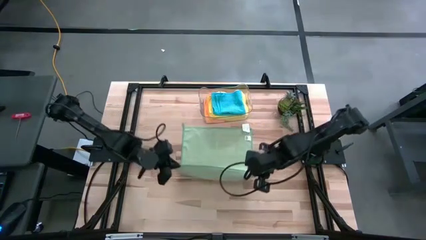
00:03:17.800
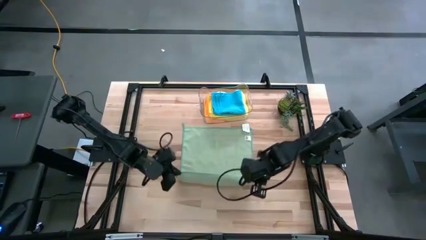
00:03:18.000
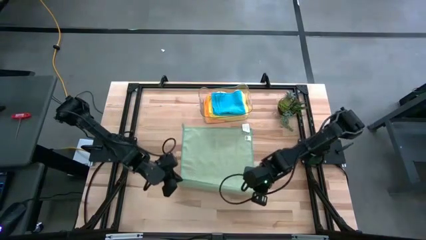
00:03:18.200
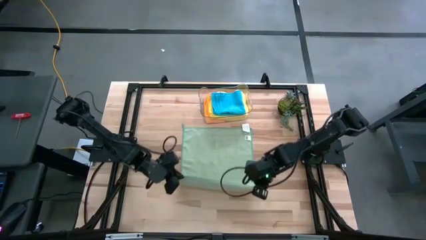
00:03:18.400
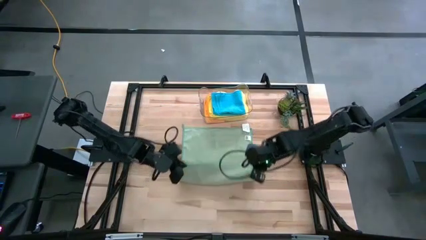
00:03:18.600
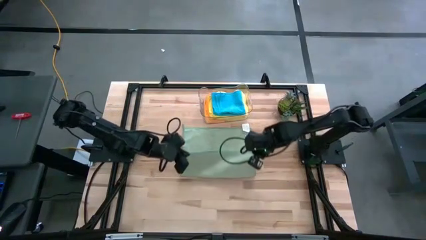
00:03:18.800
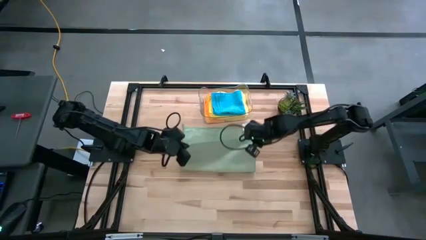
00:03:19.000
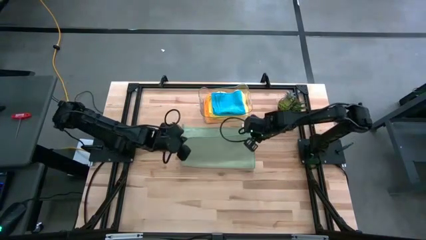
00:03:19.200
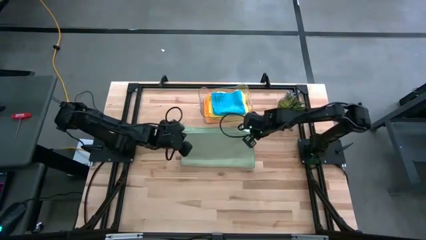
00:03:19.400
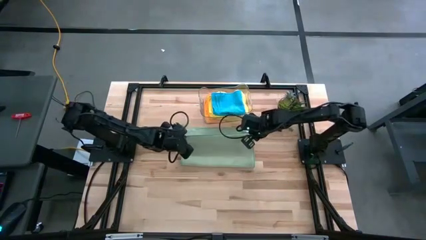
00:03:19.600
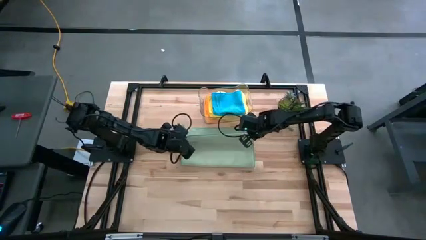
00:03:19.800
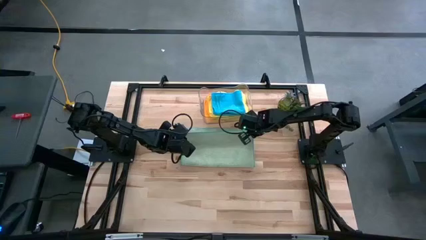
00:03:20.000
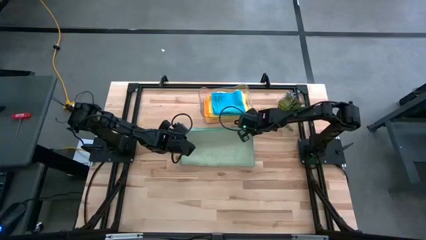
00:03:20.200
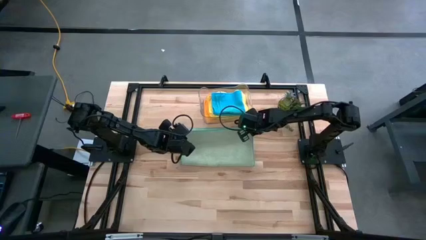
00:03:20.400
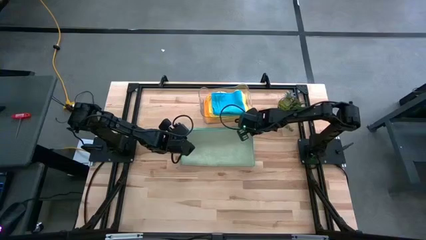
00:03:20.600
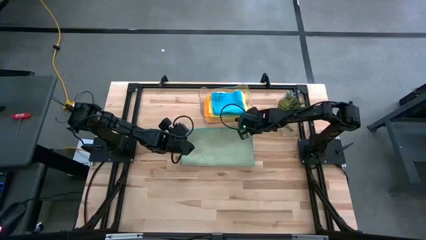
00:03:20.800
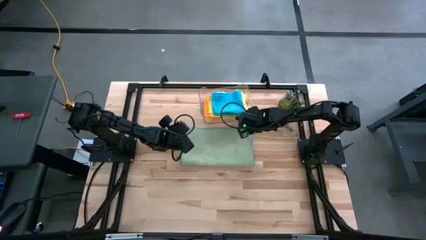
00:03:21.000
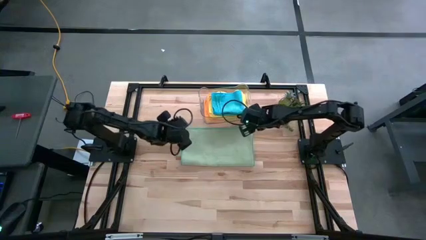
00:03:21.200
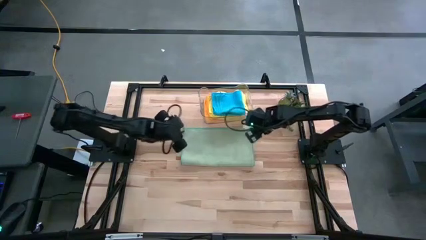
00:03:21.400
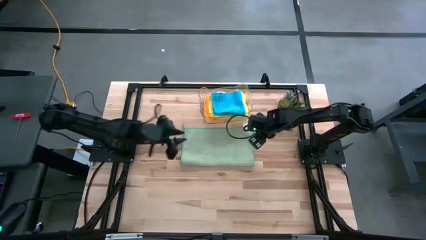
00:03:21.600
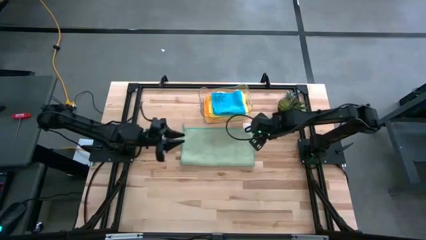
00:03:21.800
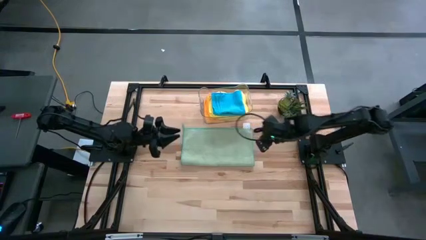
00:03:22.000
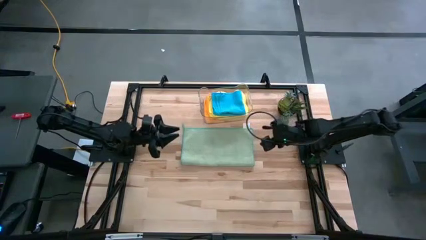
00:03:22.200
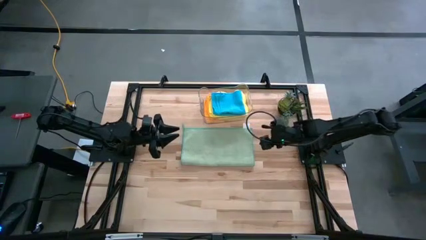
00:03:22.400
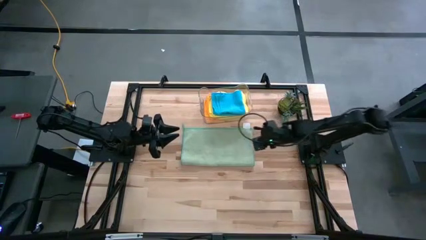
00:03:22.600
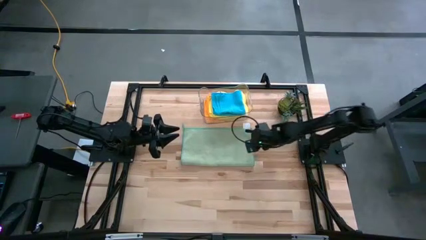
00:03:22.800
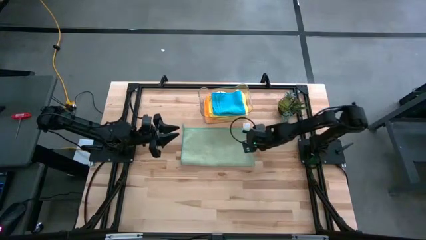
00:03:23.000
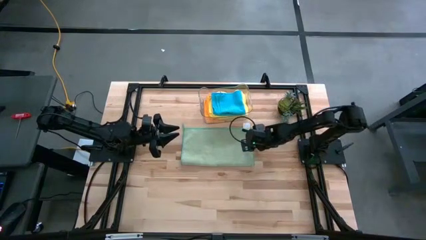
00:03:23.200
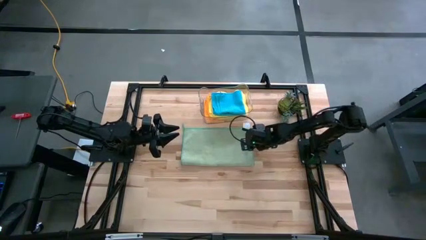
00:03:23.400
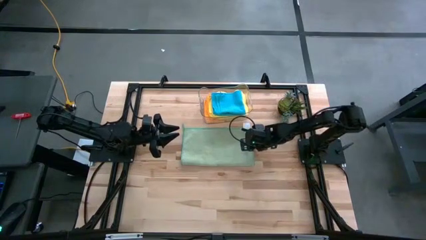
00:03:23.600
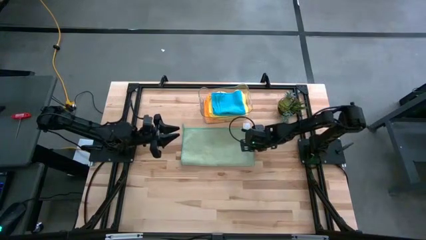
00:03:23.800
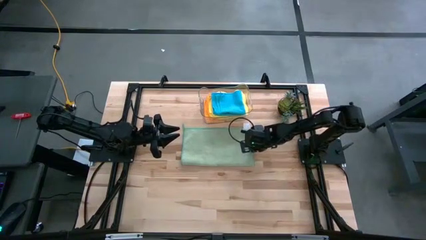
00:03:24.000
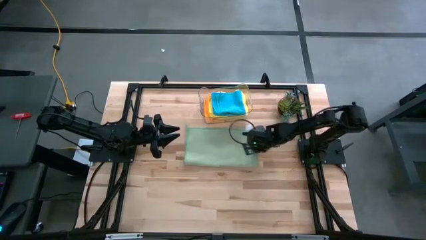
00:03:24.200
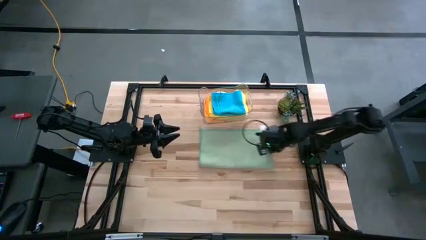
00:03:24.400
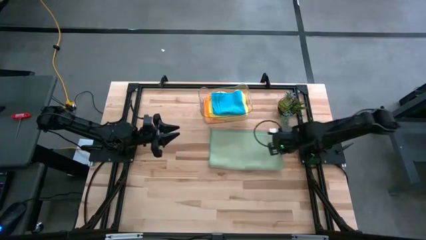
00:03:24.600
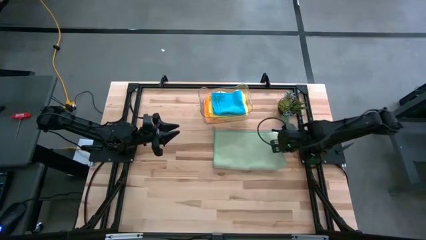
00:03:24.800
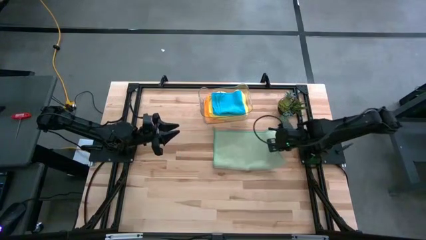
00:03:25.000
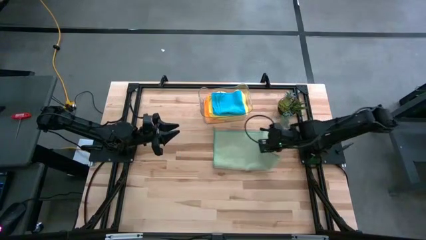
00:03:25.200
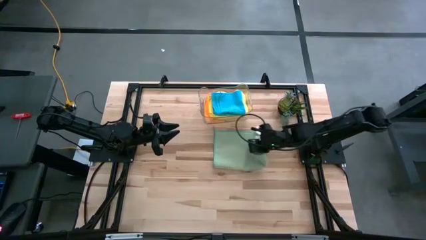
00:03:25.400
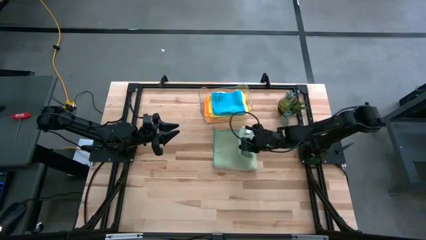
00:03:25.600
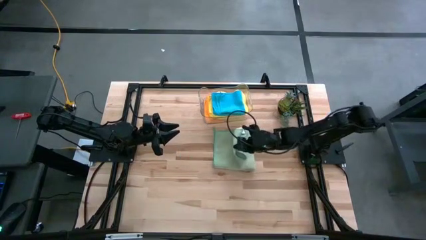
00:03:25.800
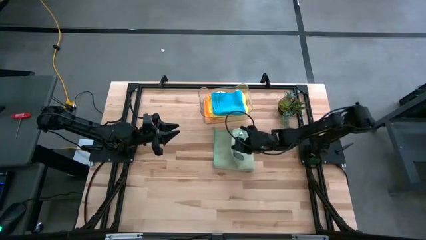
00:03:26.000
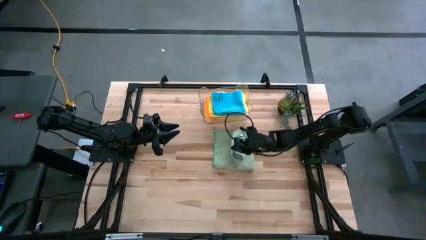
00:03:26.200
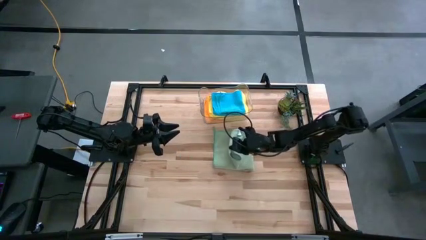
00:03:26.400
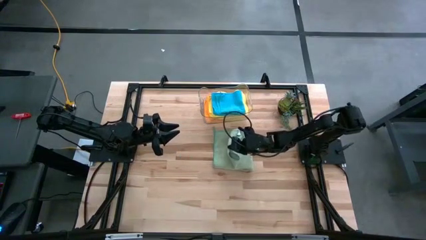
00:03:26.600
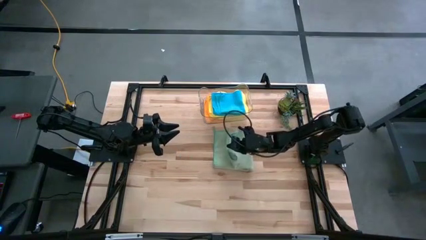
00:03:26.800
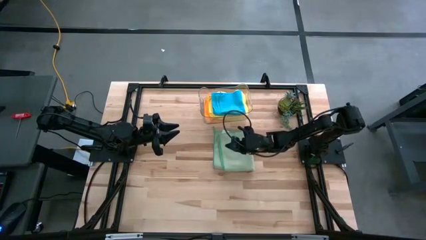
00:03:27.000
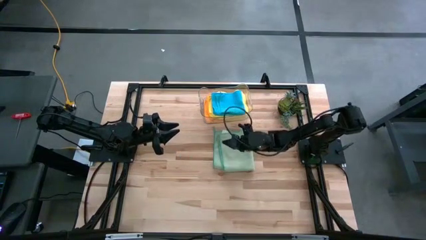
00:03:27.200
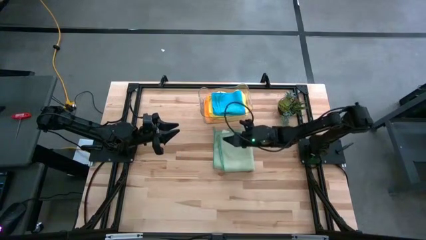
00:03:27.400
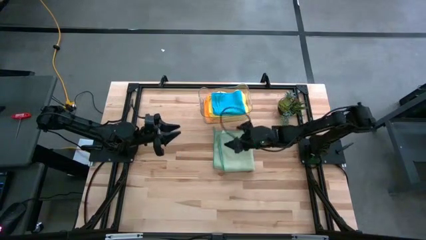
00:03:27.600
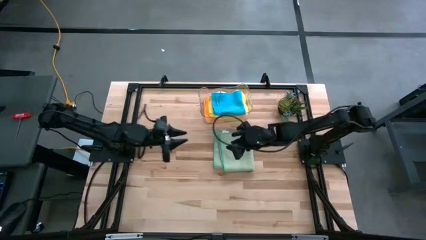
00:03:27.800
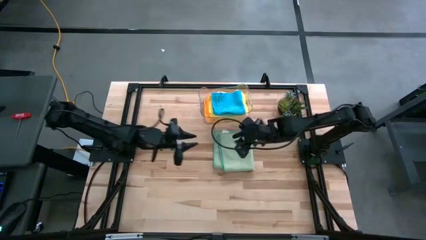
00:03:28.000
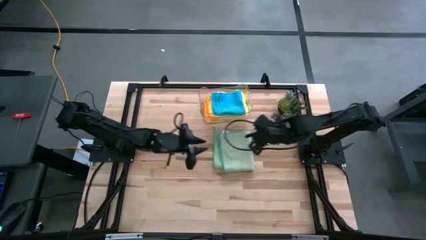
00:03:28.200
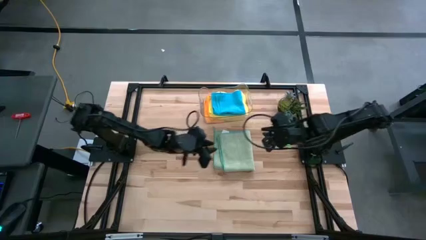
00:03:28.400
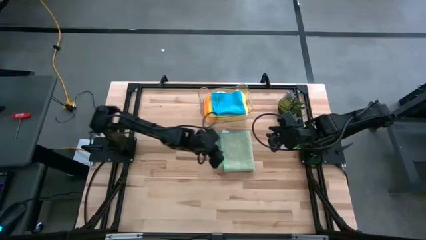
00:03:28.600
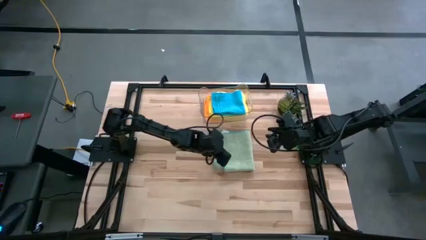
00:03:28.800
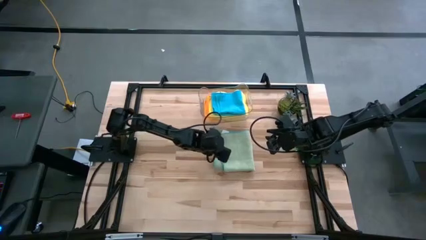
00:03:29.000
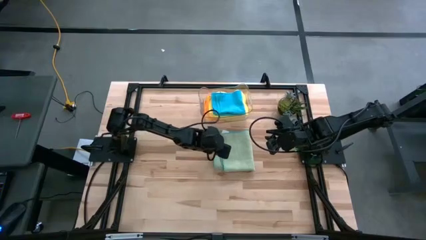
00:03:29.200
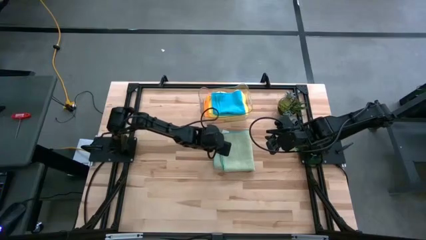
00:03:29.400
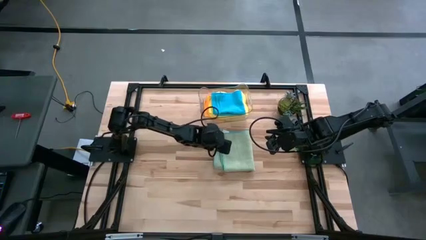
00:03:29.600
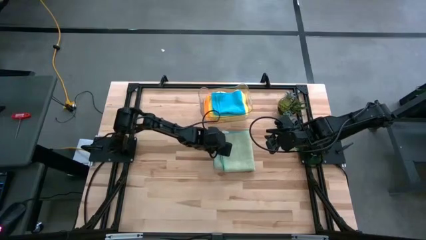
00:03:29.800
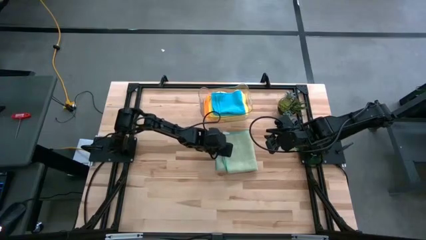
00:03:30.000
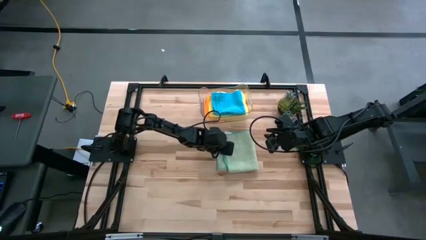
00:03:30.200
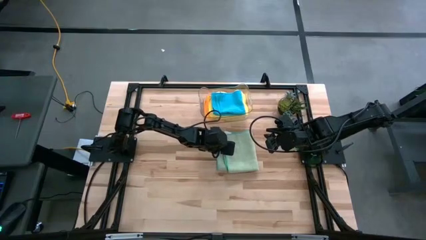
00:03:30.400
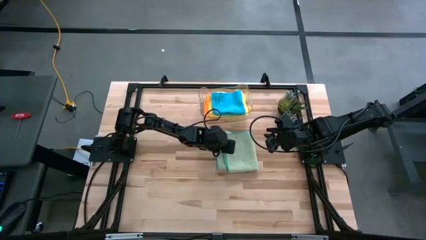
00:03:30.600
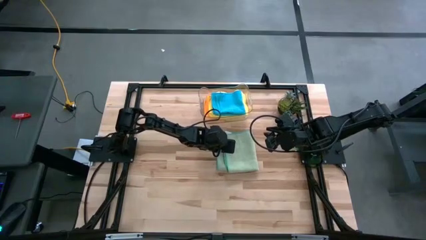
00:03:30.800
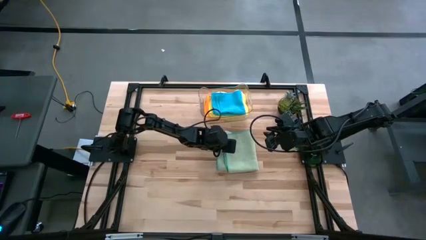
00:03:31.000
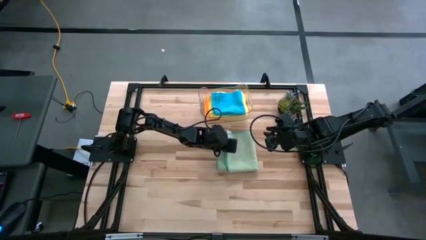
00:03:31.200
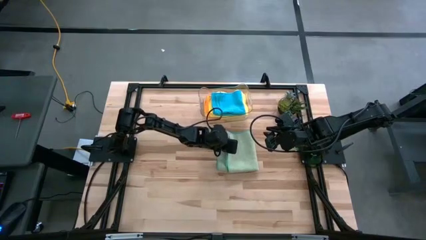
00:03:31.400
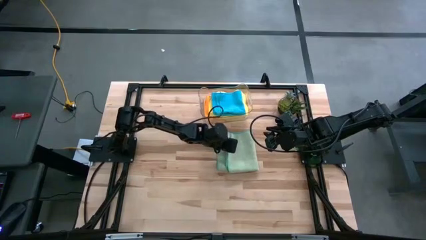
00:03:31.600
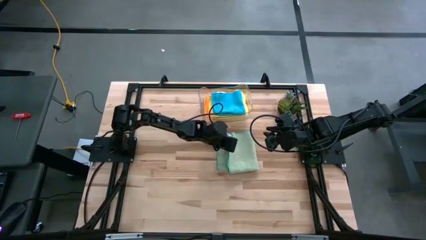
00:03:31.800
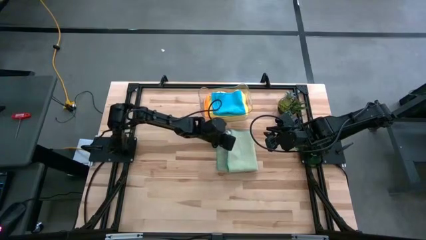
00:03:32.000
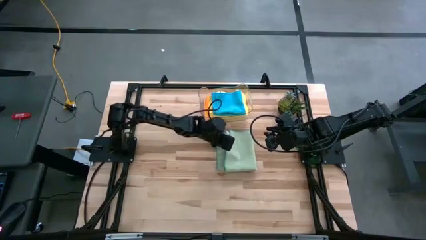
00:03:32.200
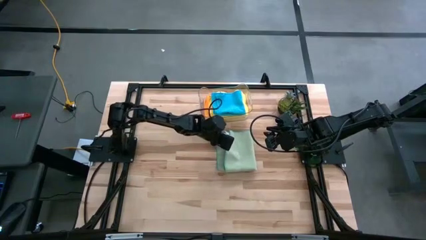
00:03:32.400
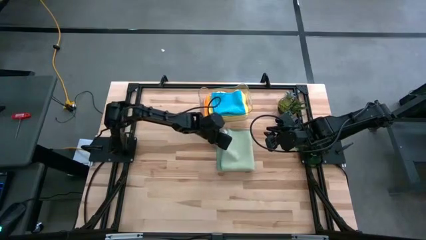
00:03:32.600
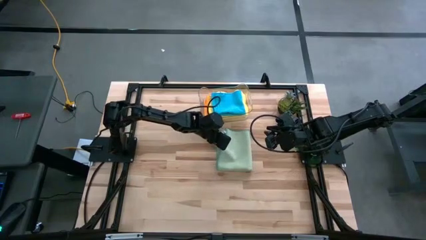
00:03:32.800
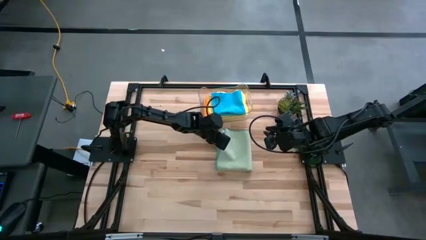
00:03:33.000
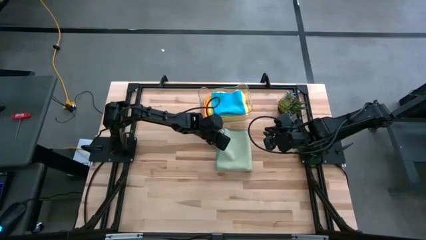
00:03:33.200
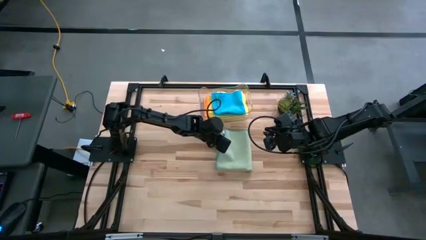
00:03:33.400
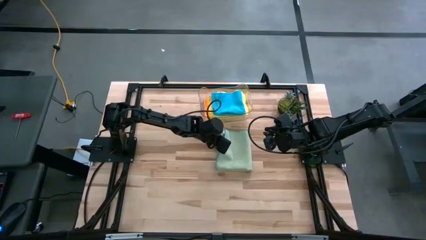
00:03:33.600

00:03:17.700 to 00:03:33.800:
Task: Fold microfiber towels
Fold the light green microfiber towel

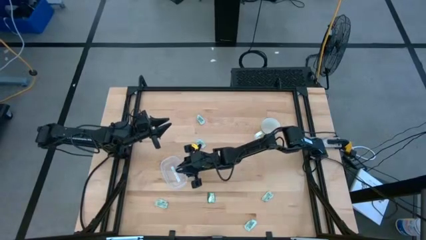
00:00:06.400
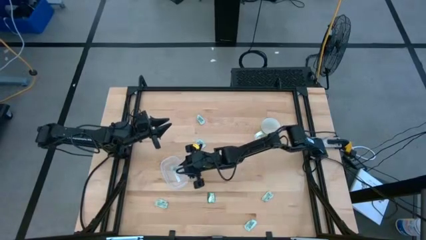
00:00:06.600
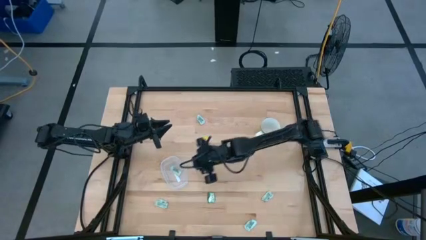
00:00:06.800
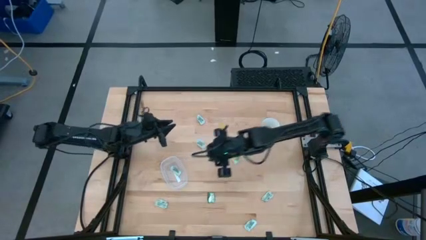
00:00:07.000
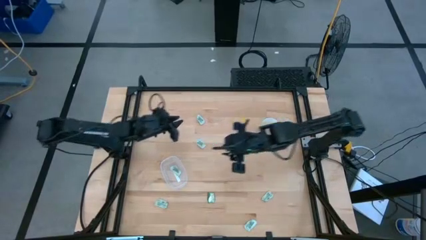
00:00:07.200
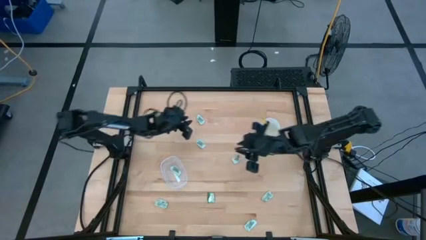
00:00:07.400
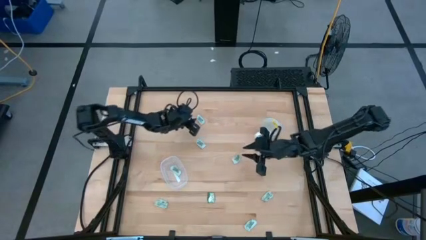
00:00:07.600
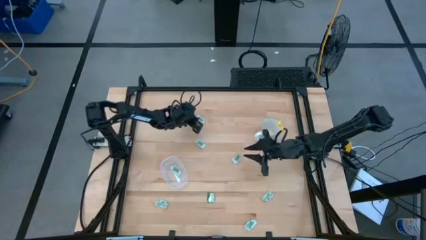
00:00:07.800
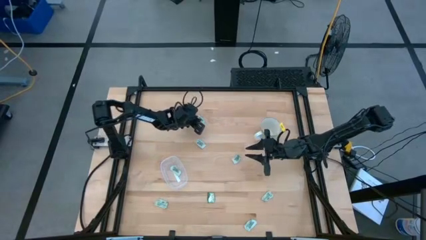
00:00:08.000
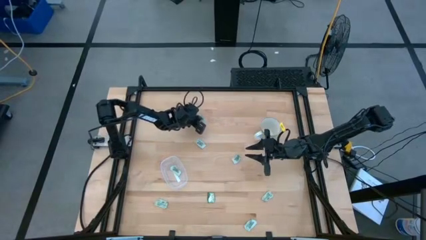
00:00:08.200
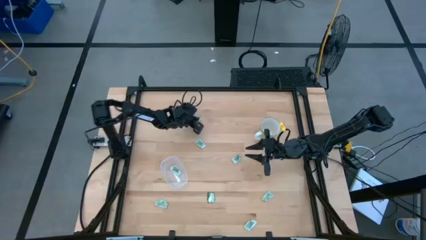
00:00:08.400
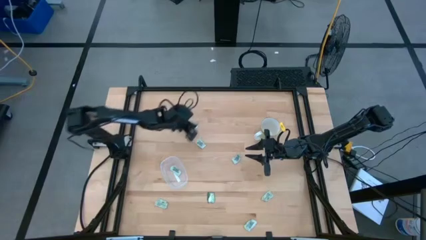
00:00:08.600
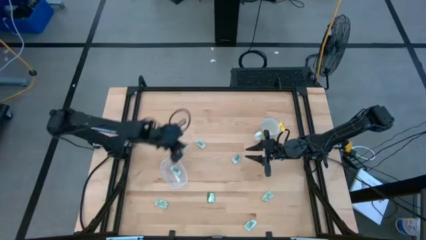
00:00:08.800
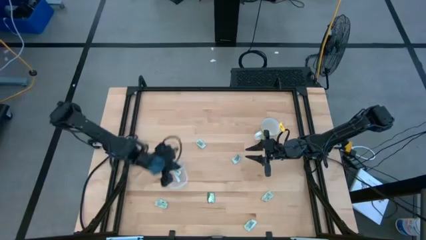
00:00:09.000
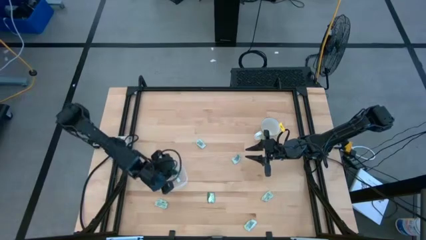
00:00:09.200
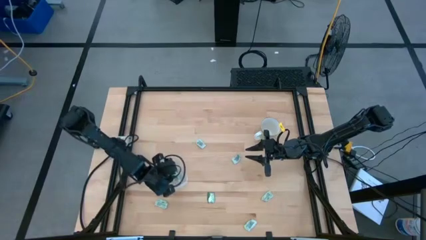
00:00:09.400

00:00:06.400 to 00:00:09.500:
Task: Pick and place Stevia / Truvia into bins
Put the green stevia packet into the transparent bin
